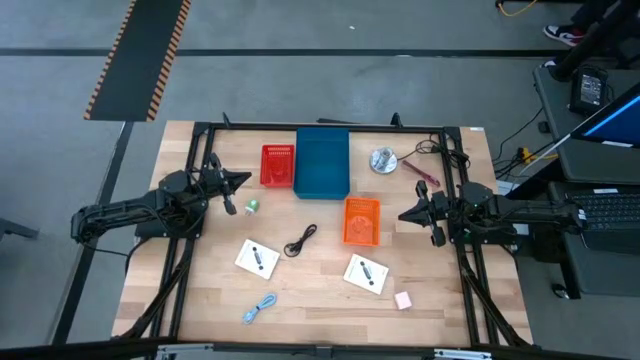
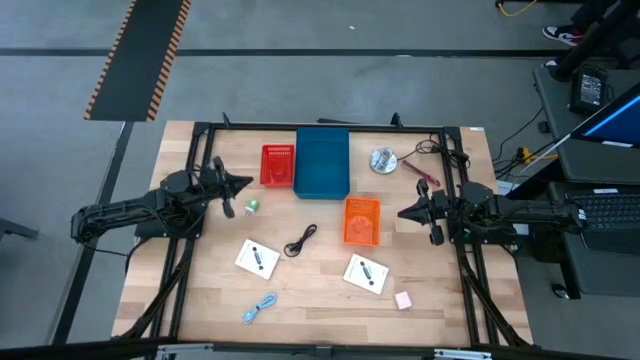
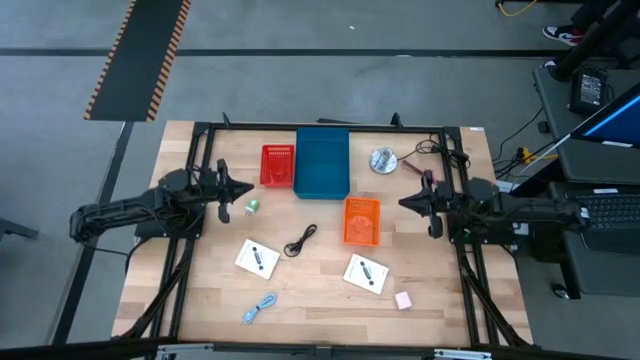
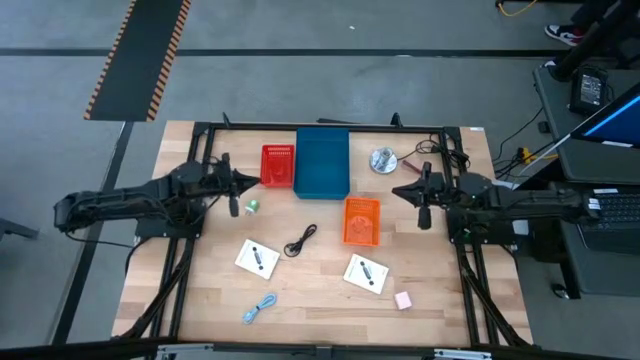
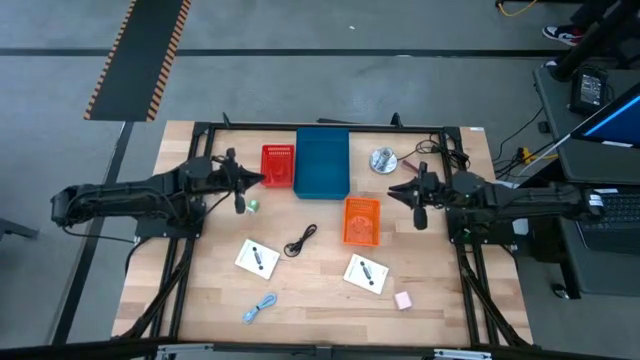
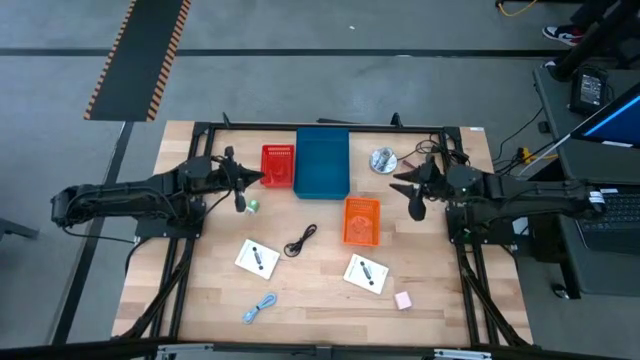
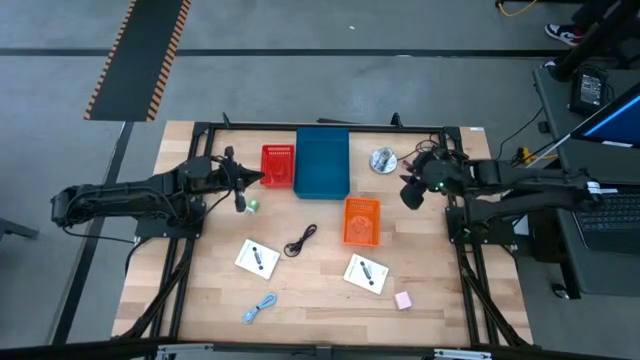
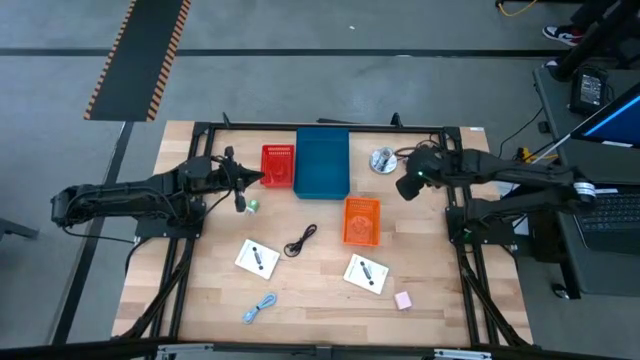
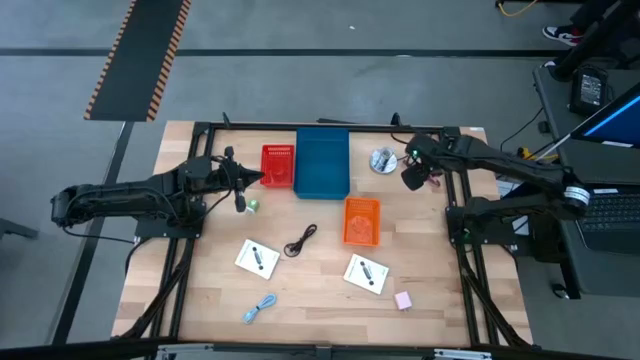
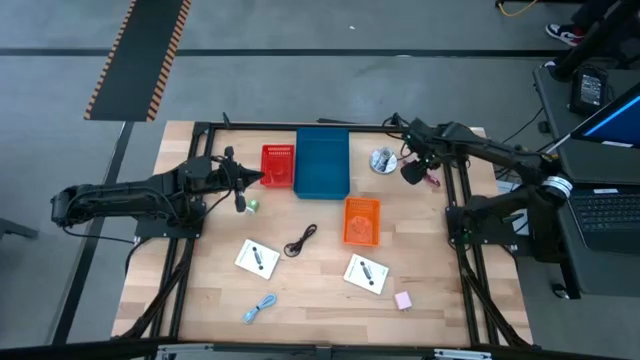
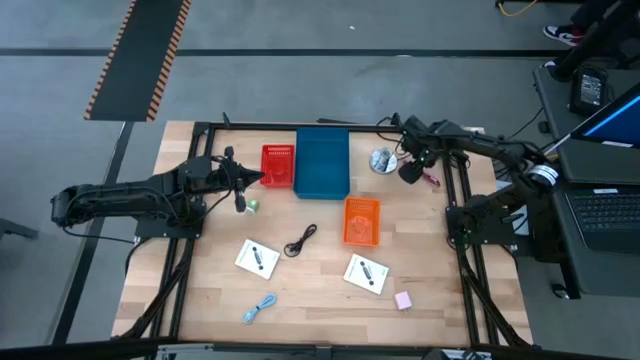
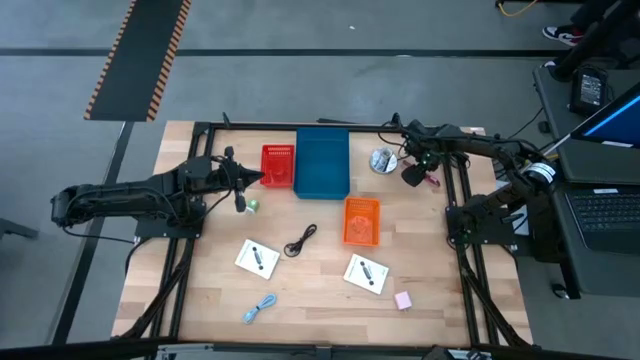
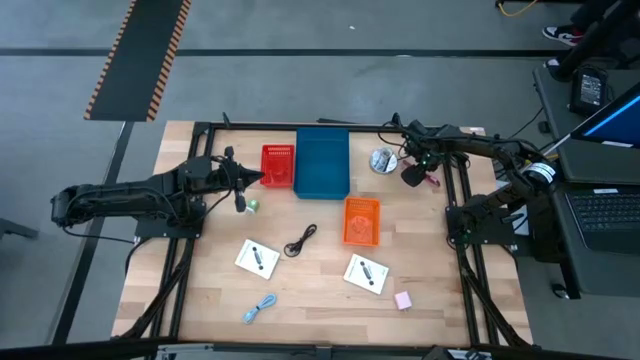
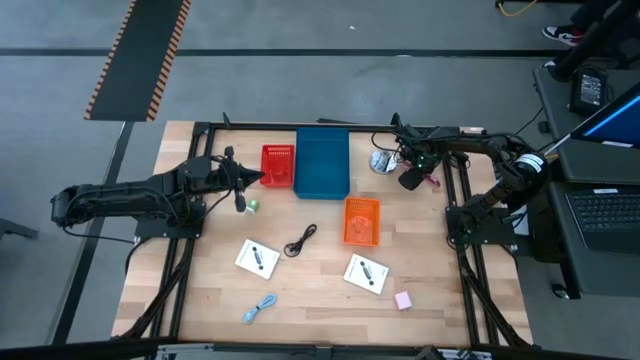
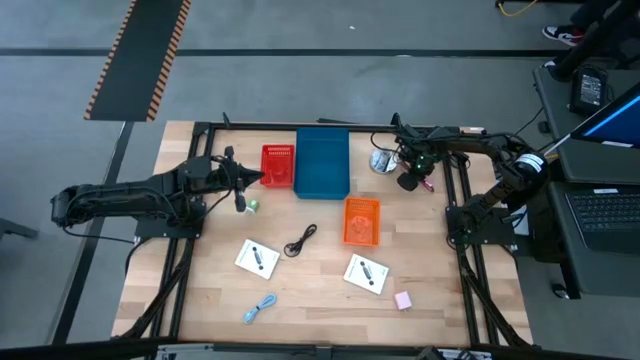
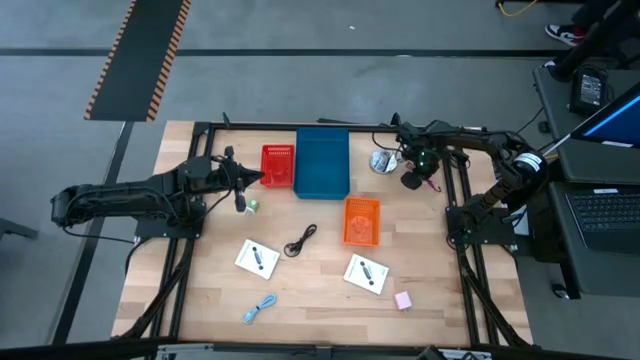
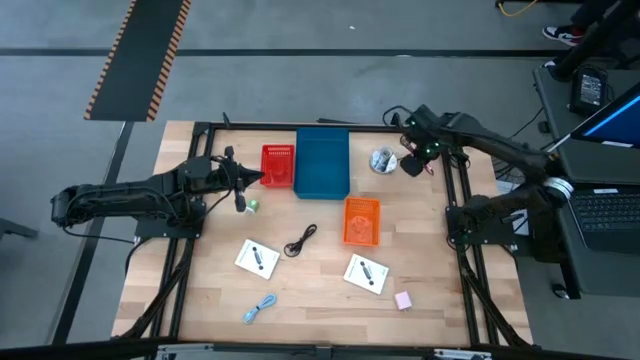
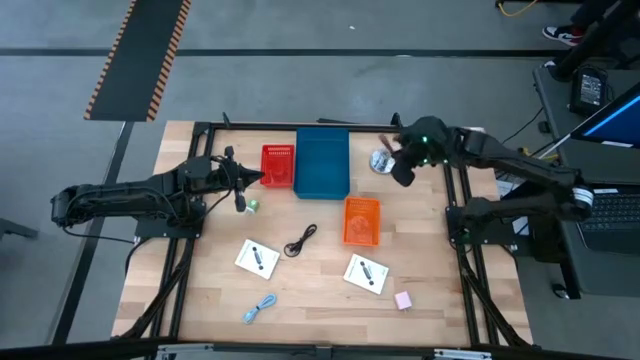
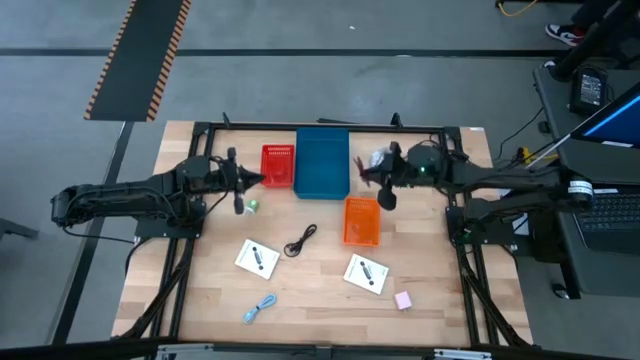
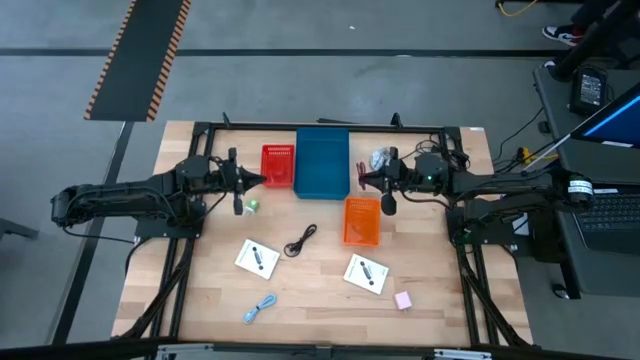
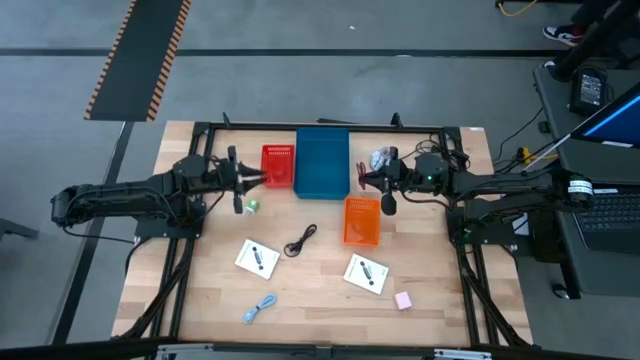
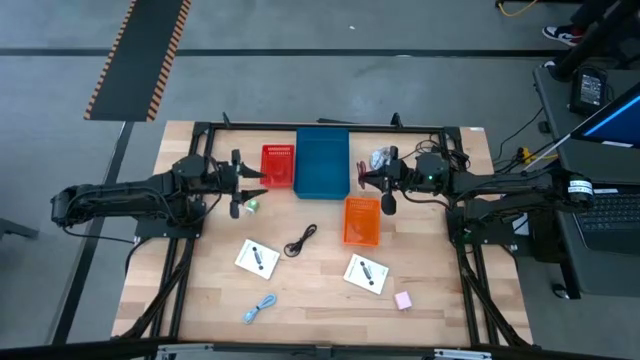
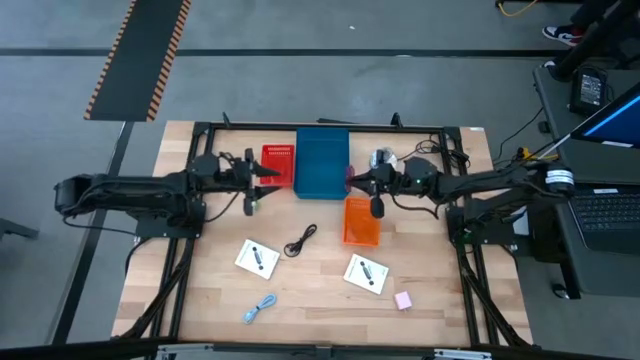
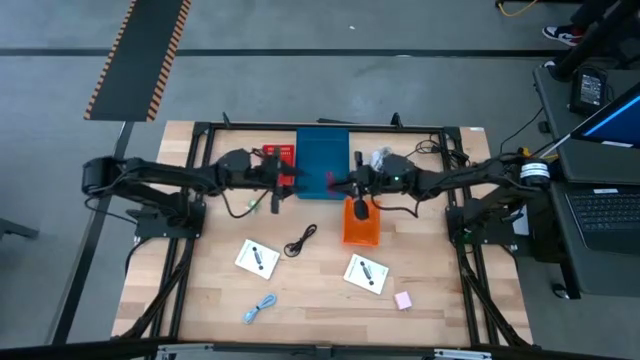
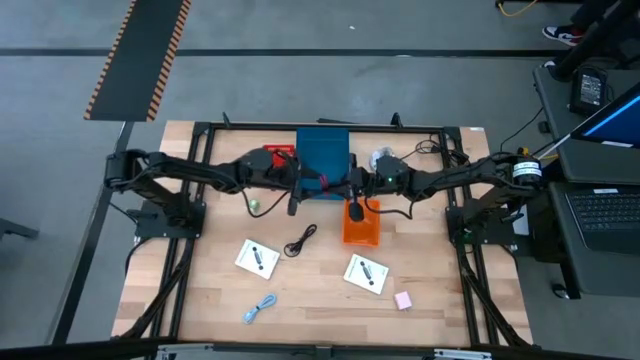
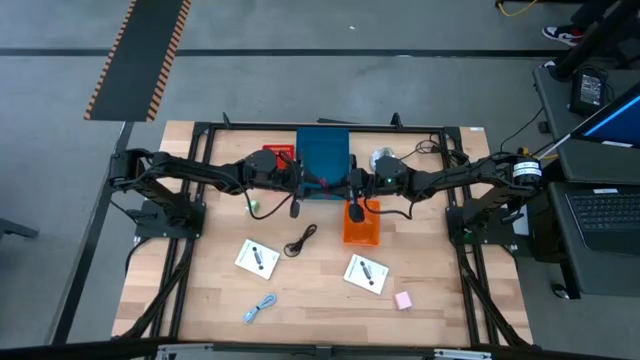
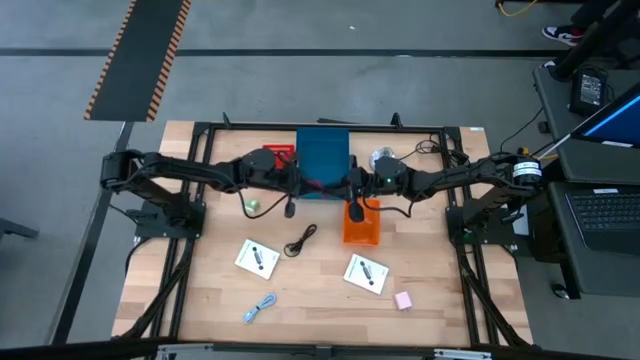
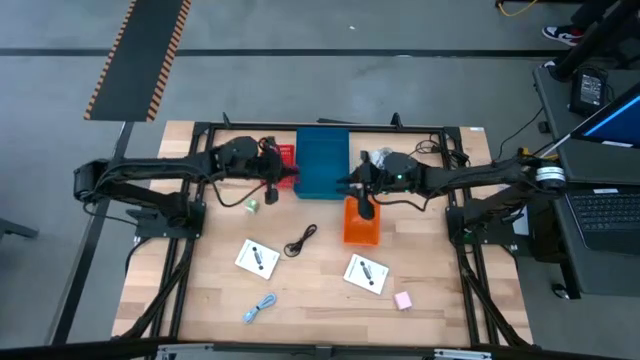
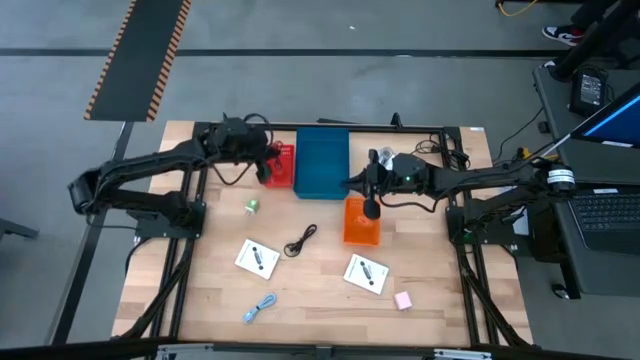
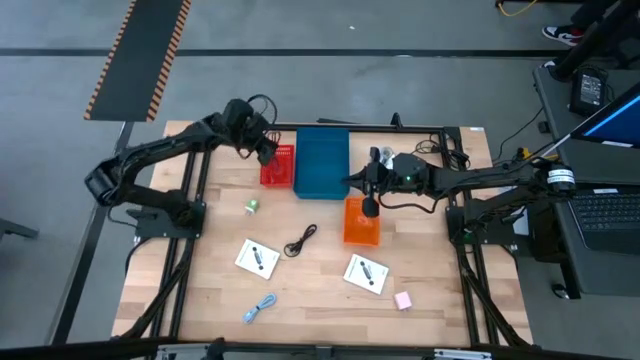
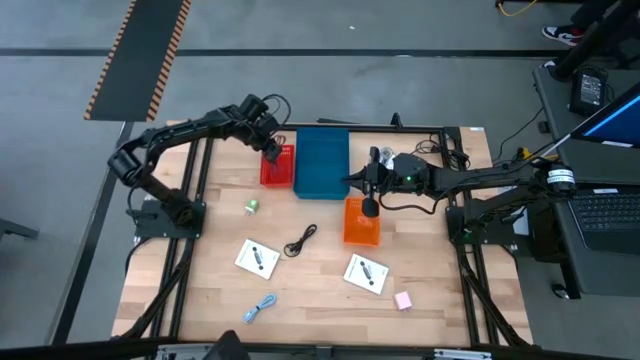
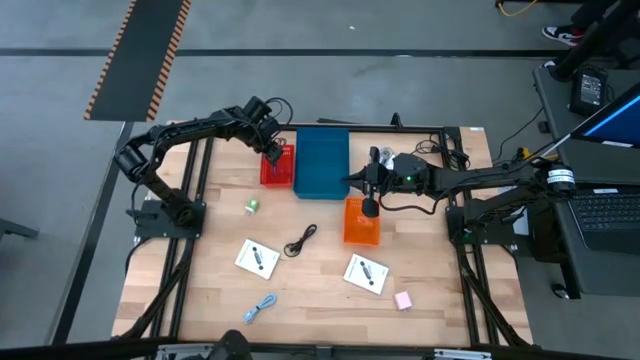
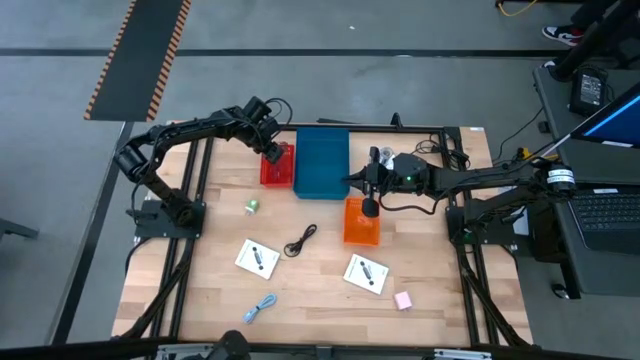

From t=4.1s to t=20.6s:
Task: Pick and place items into bin
Put the pink charger cable into the red bin
